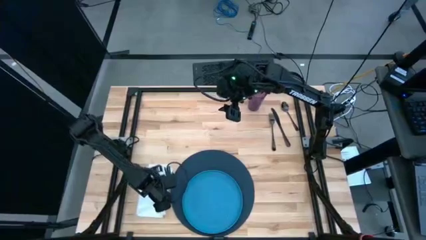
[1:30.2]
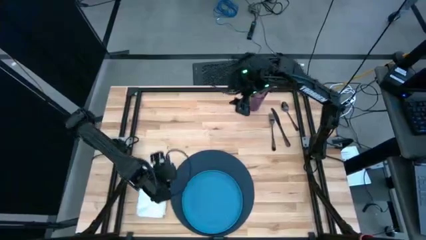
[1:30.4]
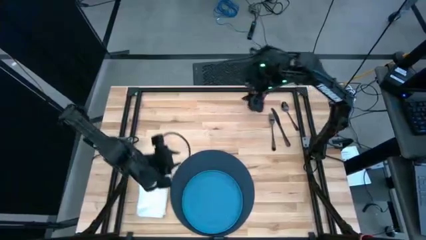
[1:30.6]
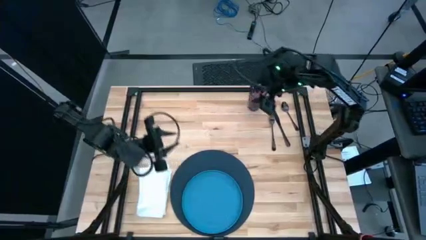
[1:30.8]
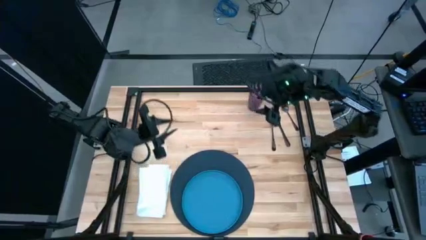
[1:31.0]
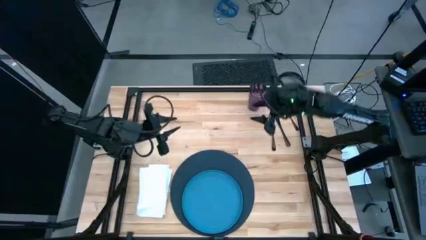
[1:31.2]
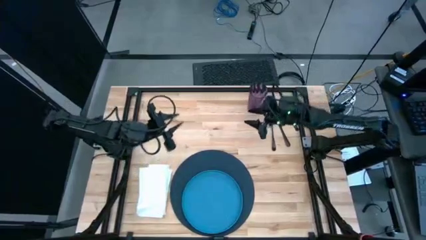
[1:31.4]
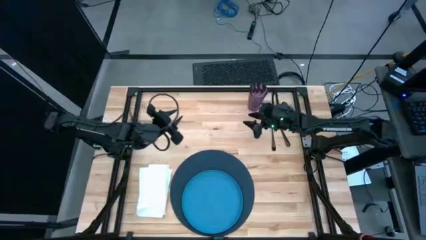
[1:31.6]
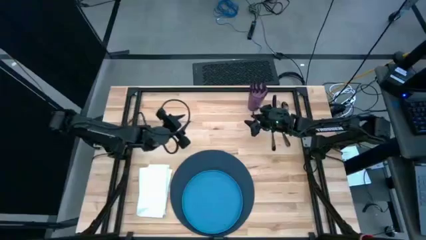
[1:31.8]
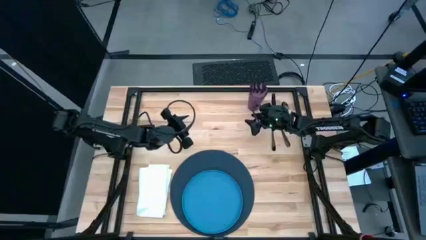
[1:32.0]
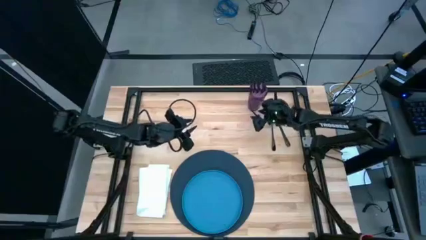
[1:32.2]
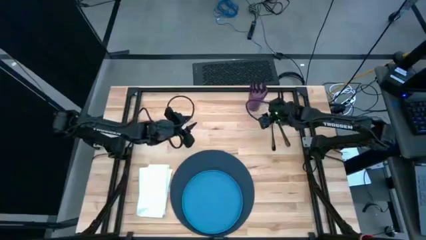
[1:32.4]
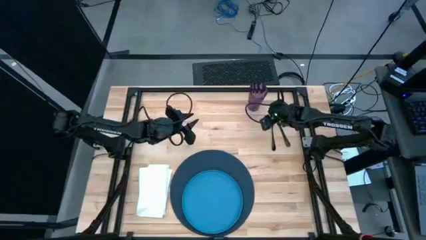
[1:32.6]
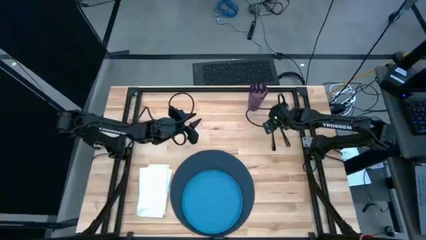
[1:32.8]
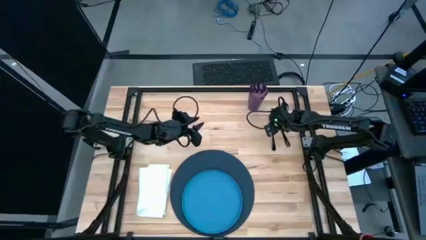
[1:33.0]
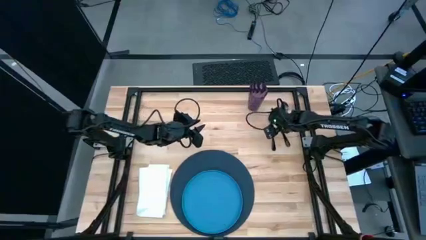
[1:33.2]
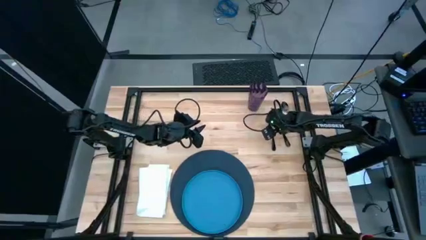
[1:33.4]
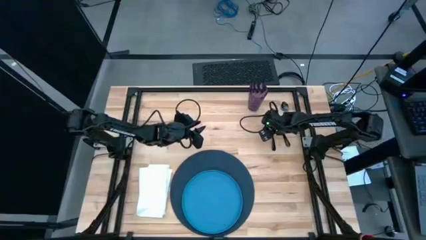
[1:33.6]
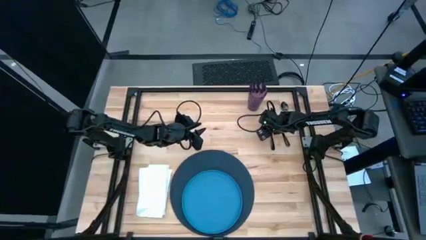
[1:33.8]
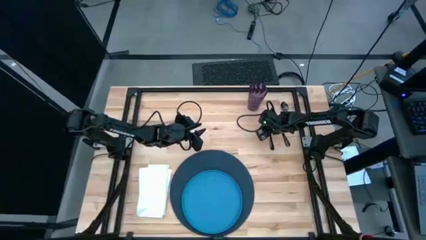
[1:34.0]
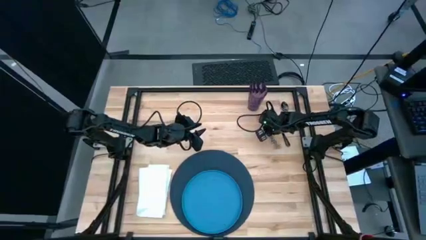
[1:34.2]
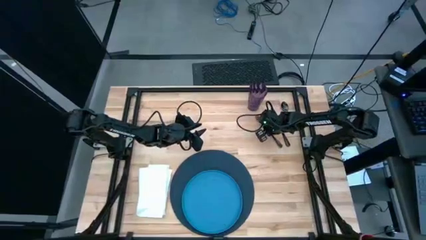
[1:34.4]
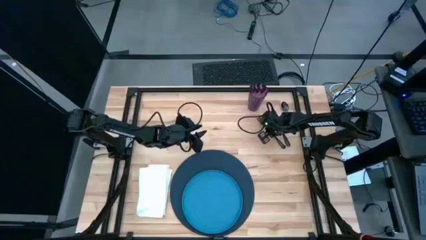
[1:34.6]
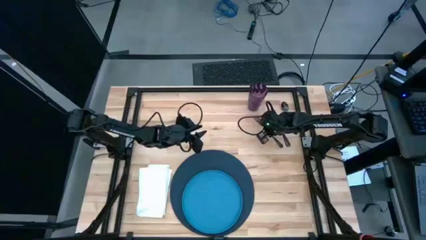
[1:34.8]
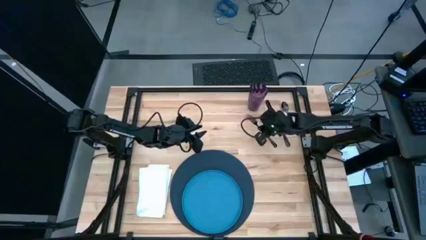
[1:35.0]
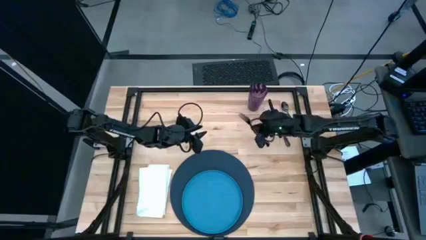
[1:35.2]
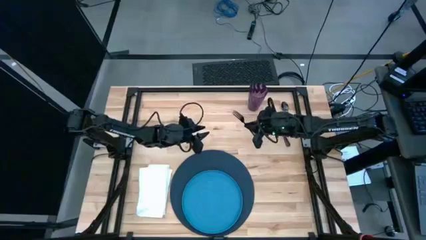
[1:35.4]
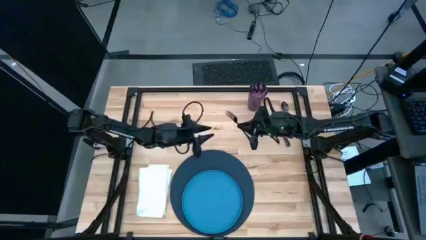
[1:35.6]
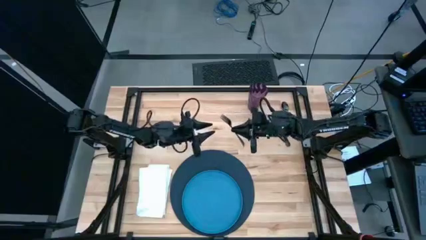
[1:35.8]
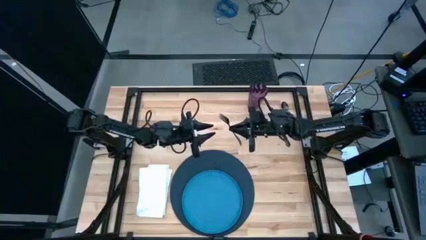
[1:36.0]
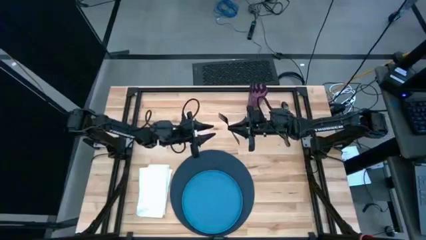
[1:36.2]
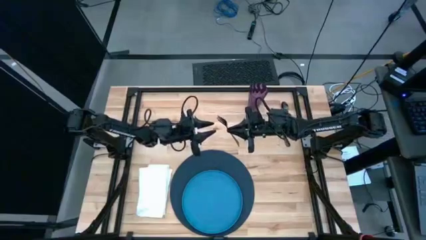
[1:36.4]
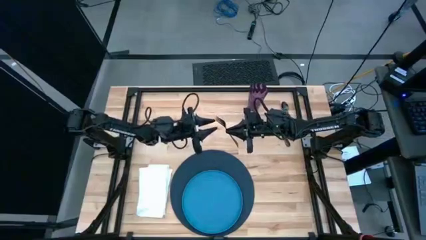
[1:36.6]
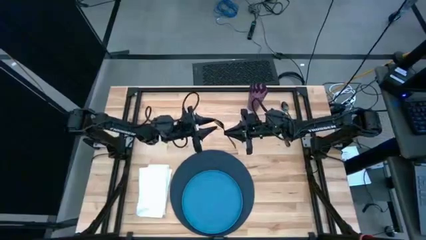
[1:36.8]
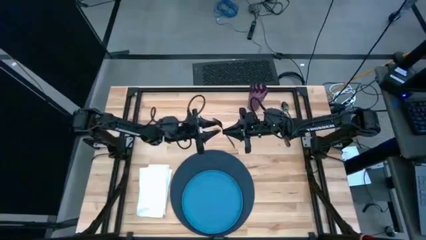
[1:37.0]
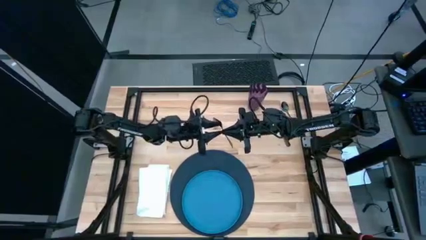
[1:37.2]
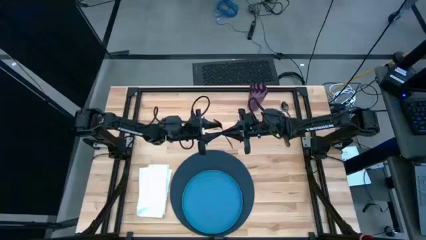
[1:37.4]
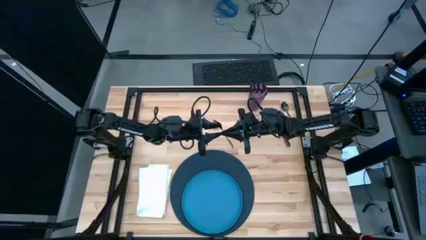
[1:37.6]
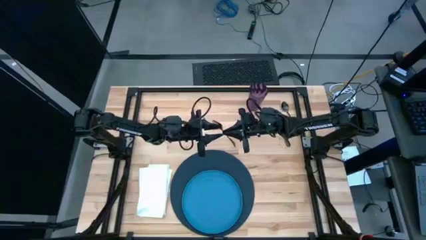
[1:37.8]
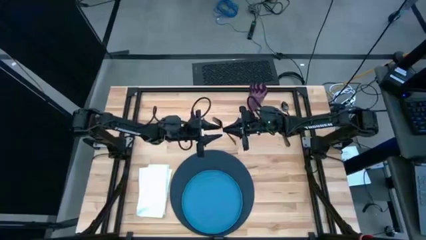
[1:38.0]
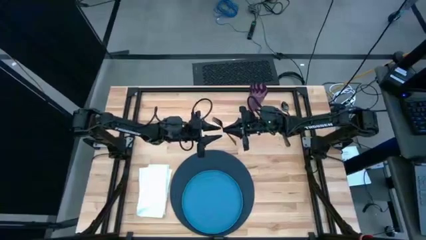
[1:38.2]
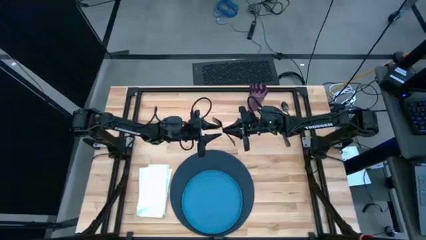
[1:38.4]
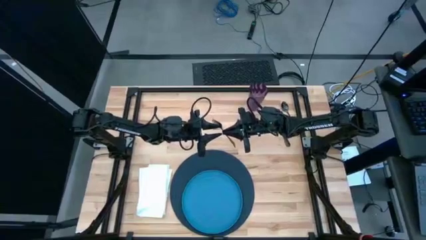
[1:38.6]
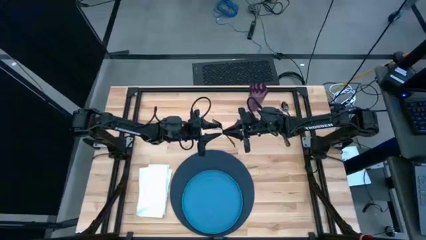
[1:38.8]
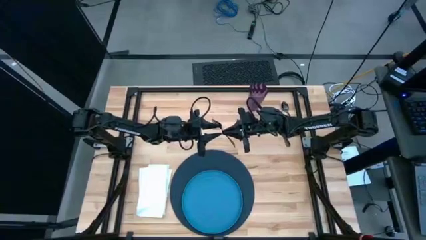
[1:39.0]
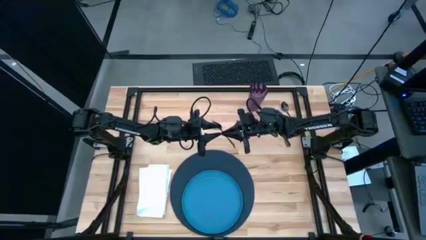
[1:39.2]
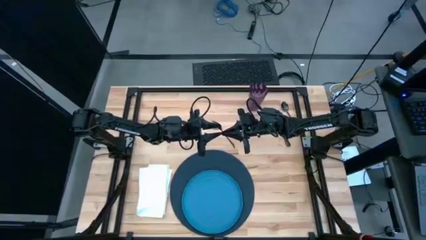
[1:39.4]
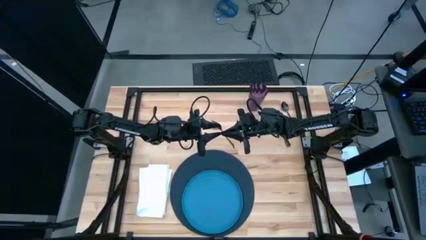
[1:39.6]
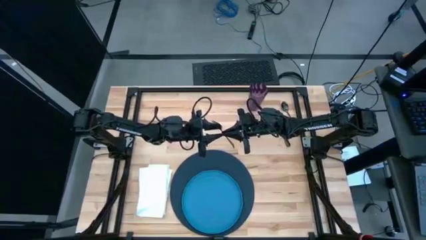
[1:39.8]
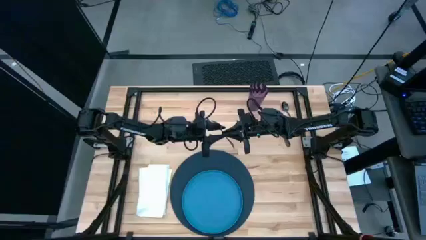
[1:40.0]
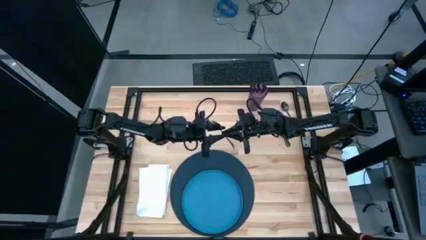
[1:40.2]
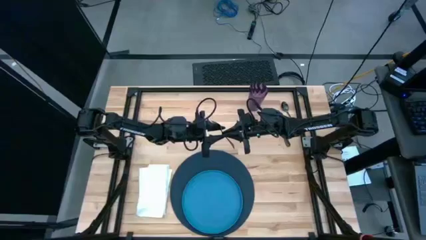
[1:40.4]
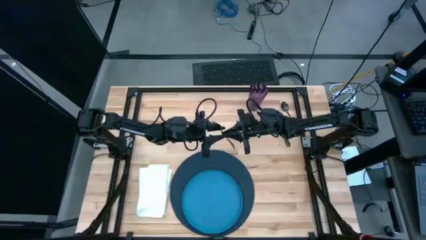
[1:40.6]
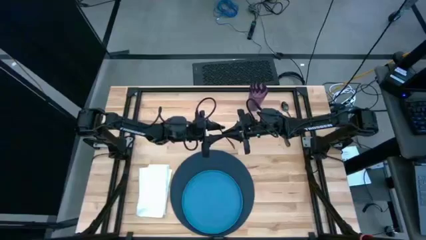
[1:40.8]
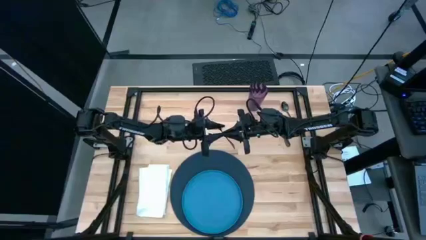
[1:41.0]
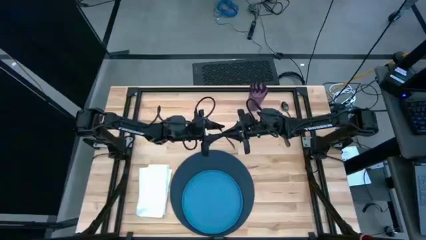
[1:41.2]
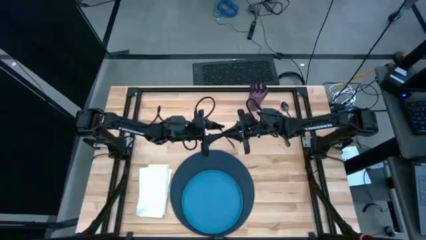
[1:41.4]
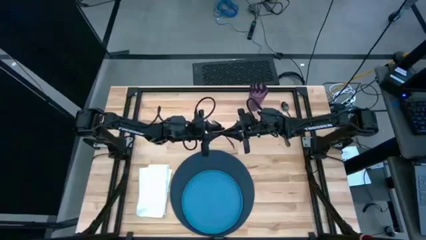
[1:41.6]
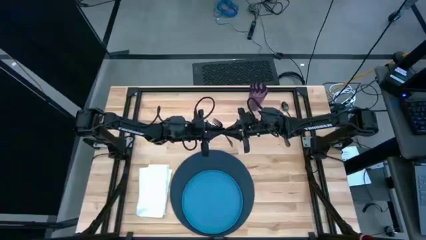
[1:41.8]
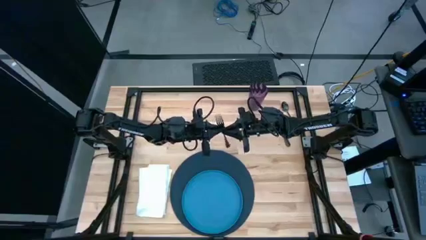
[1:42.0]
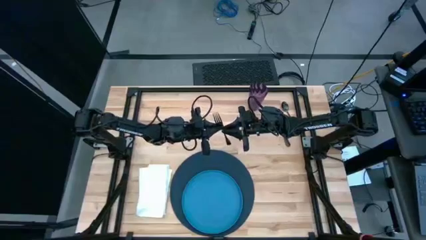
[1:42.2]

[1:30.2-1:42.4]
Task: Set table place
Put the fork on the table napkin

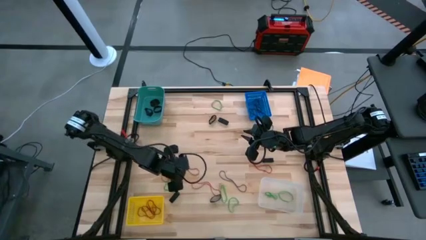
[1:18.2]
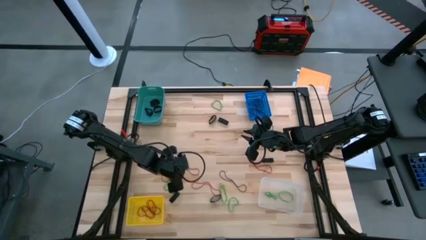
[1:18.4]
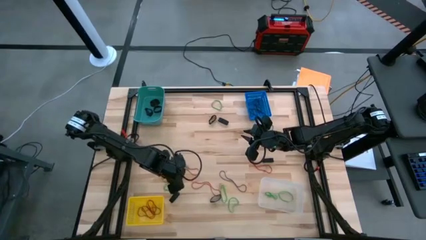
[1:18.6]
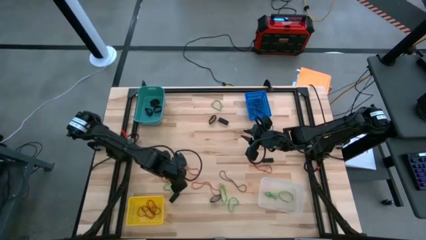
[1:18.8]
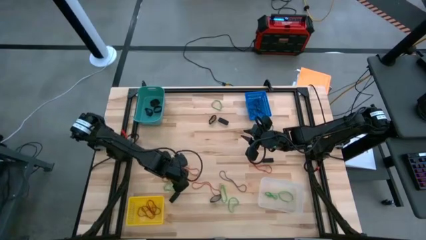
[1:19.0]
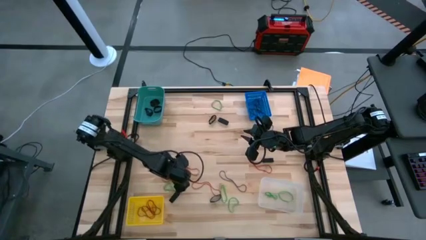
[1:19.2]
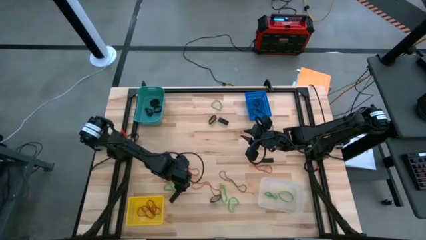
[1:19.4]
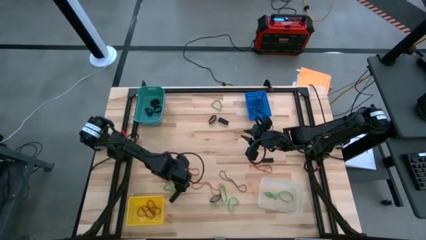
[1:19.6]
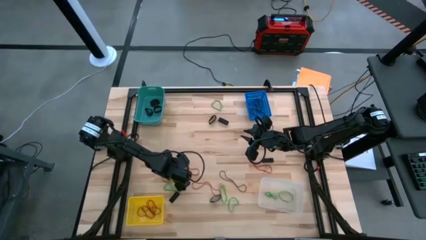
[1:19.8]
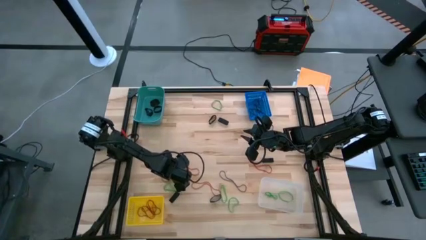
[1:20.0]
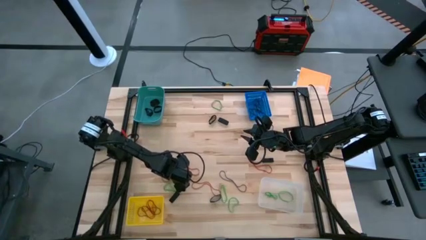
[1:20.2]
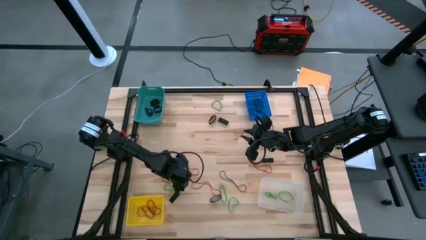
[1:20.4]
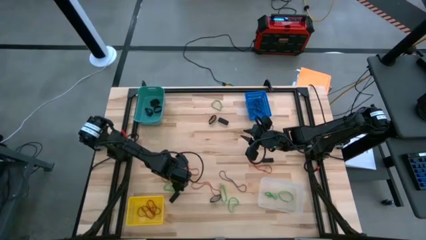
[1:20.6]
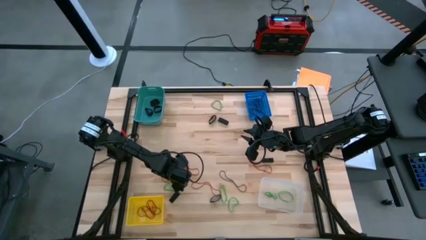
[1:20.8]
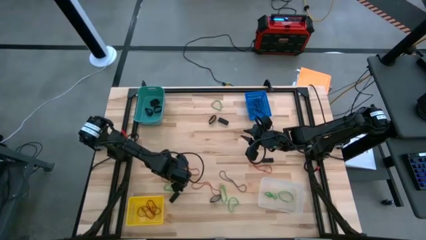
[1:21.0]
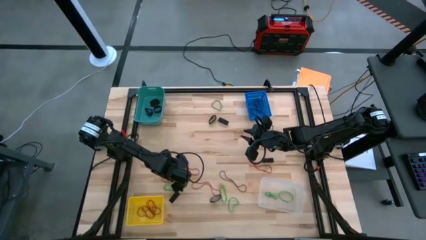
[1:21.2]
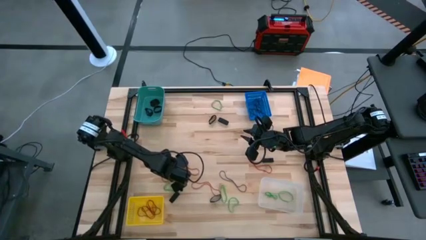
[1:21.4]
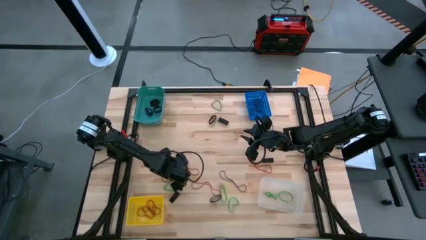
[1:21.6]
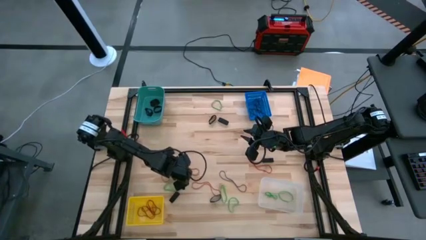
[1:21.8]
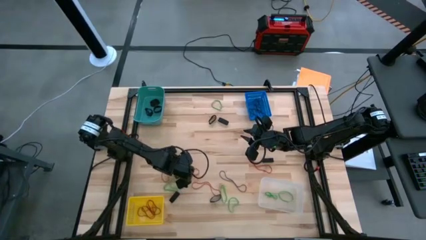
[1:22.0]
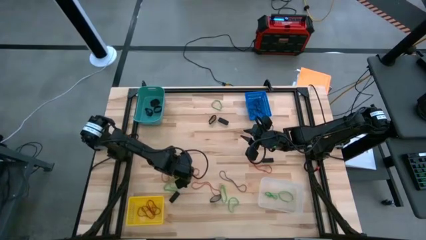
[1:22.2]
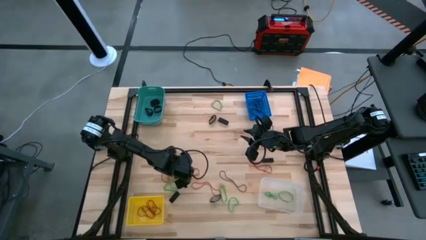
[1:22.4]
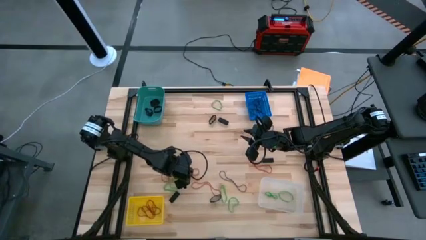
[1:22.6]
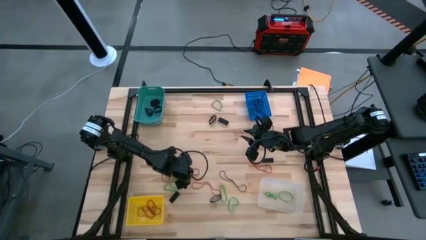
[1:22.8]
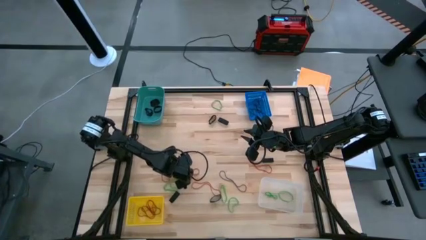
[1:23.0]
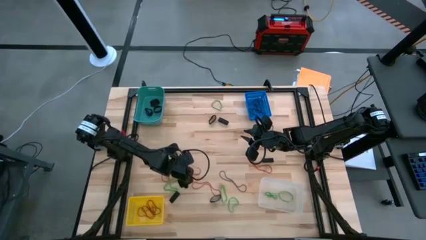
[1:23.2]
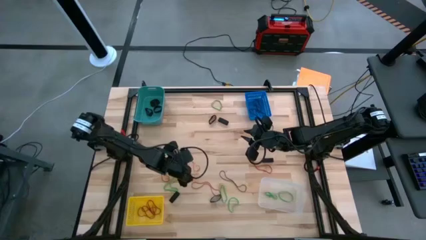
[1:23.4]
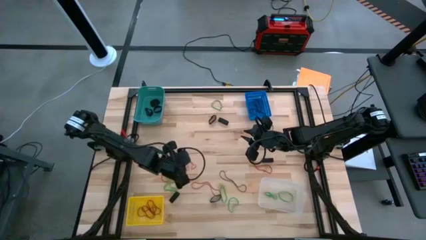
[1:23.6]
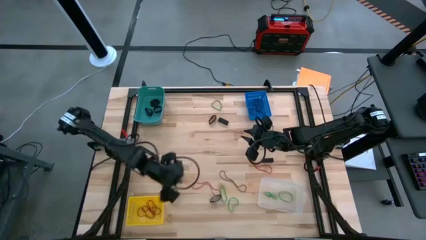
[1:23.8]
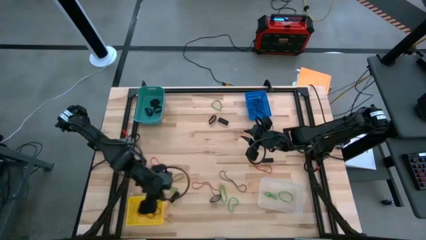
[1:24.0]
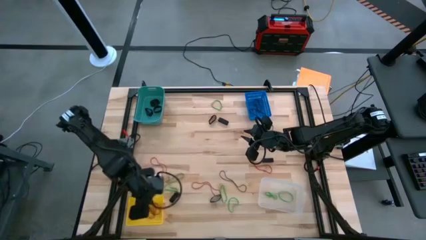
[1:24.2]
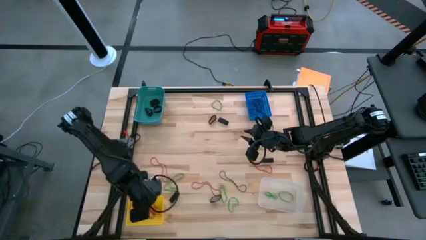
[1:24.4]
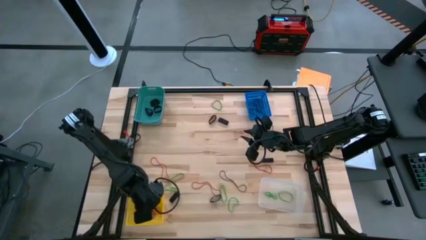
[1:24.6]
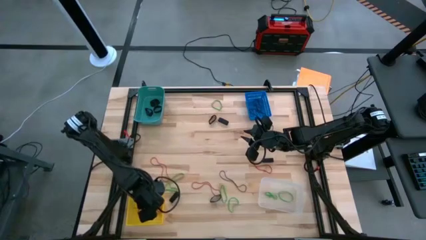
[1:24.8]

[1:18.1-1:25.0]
Task: Sort rubber bands into baskets
Put the red rubber band into the yellow basket
